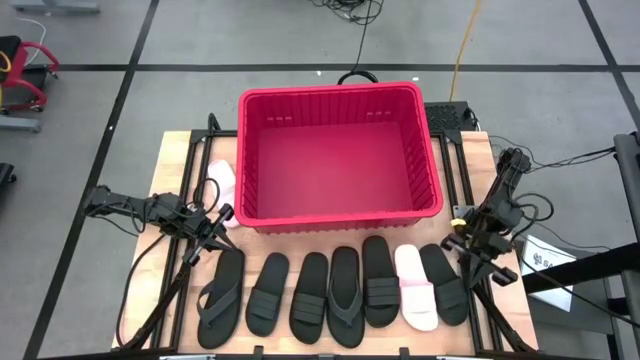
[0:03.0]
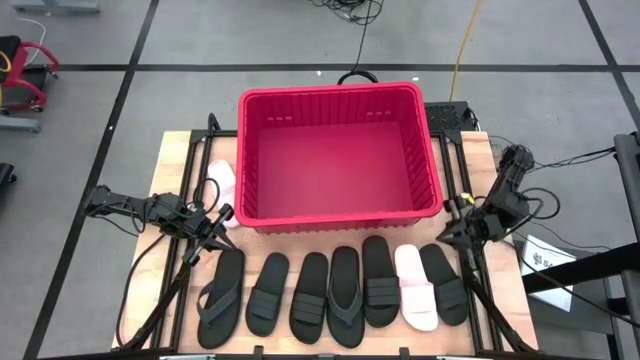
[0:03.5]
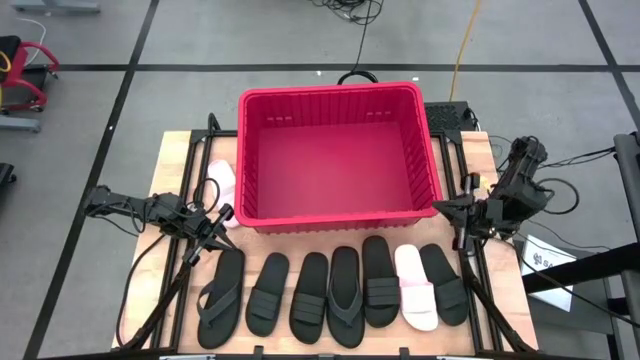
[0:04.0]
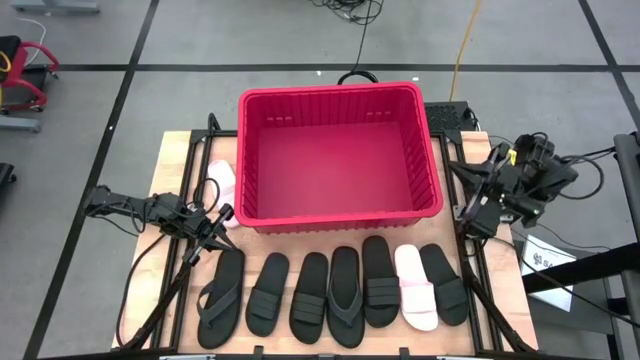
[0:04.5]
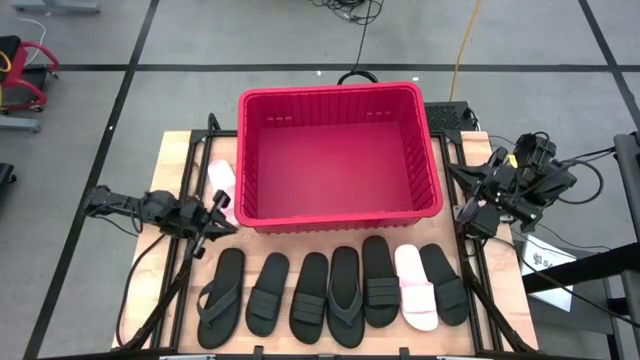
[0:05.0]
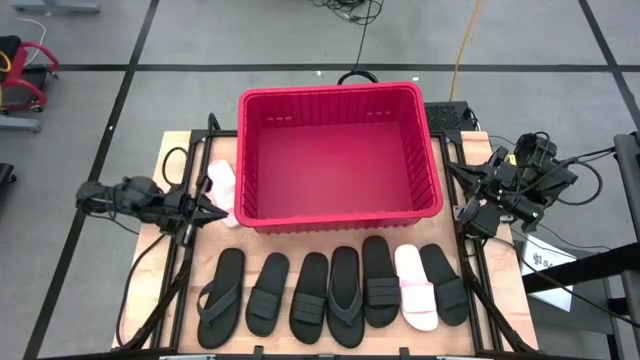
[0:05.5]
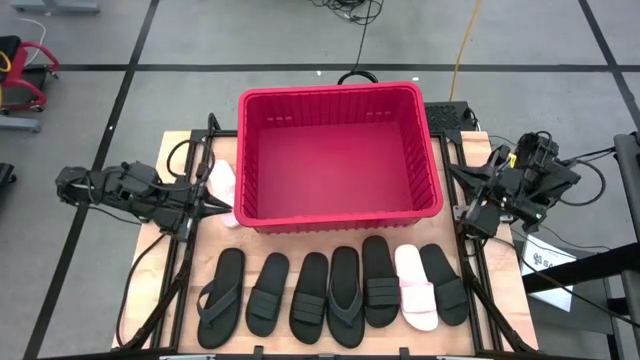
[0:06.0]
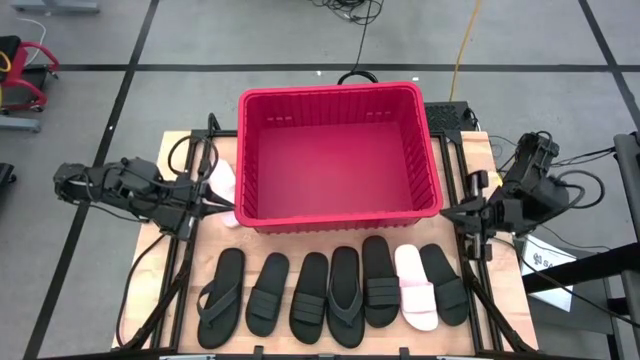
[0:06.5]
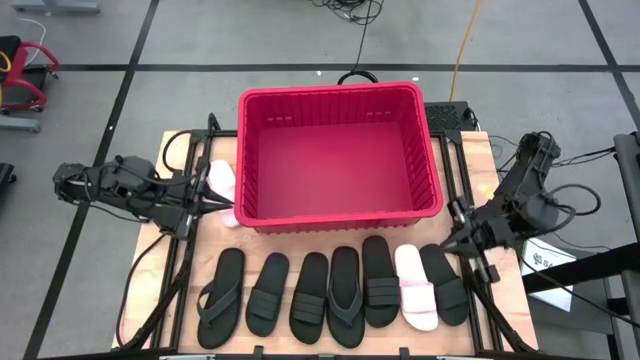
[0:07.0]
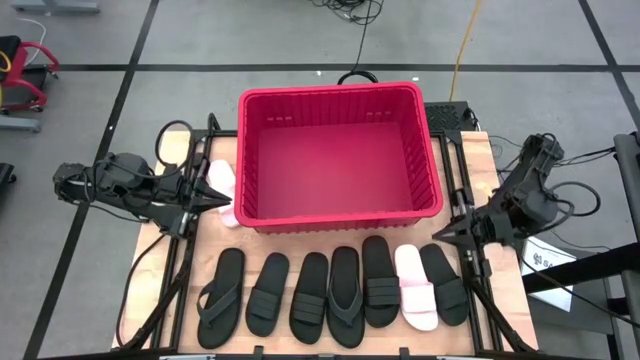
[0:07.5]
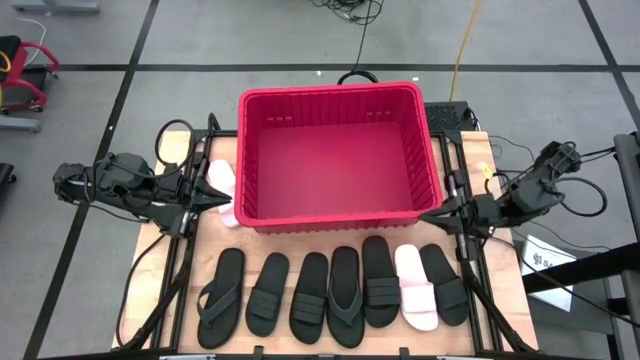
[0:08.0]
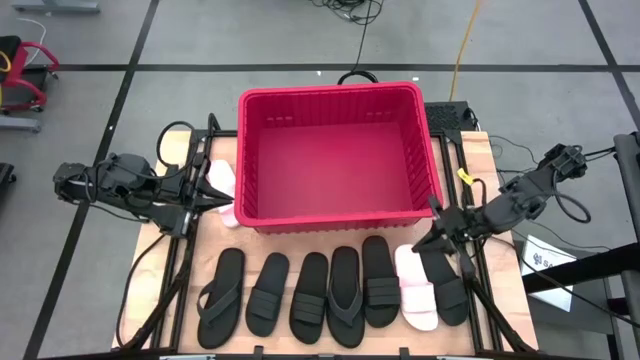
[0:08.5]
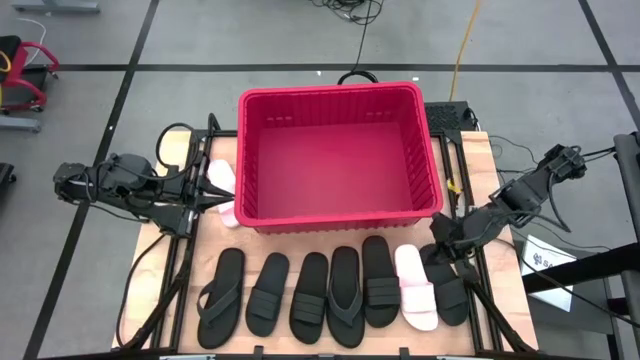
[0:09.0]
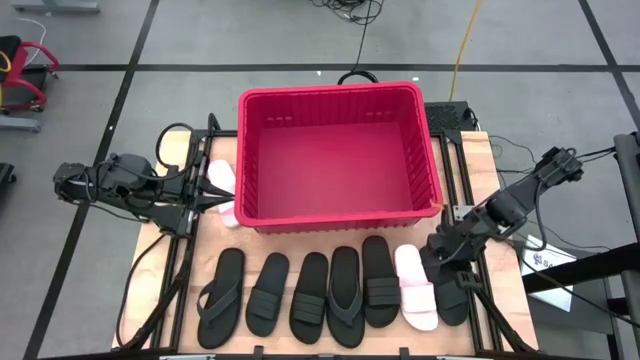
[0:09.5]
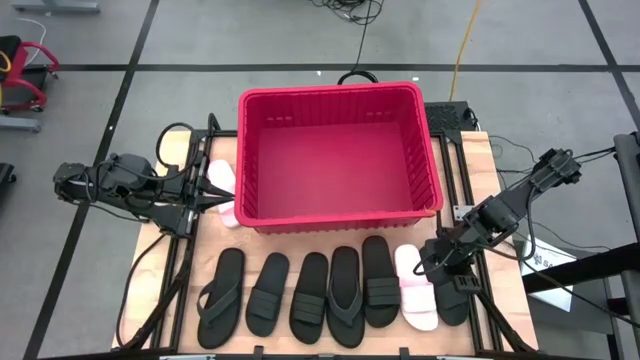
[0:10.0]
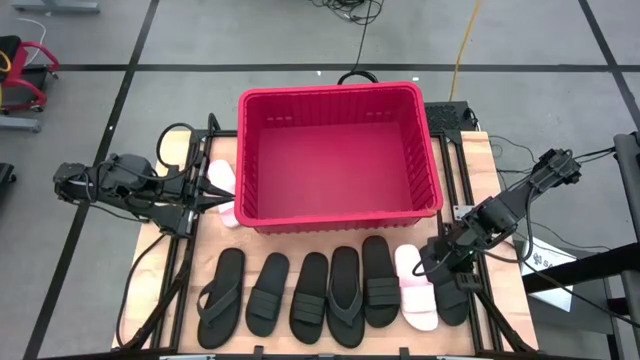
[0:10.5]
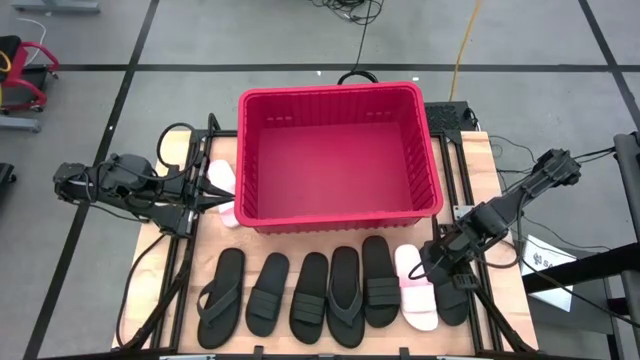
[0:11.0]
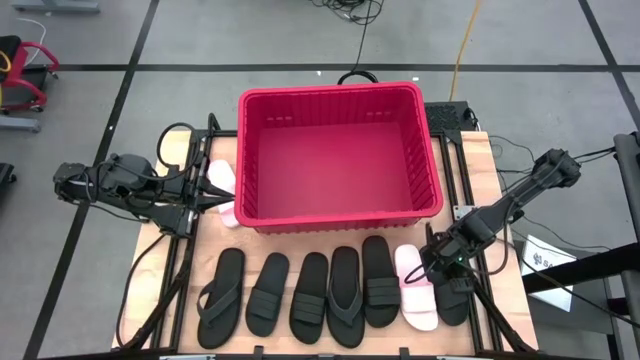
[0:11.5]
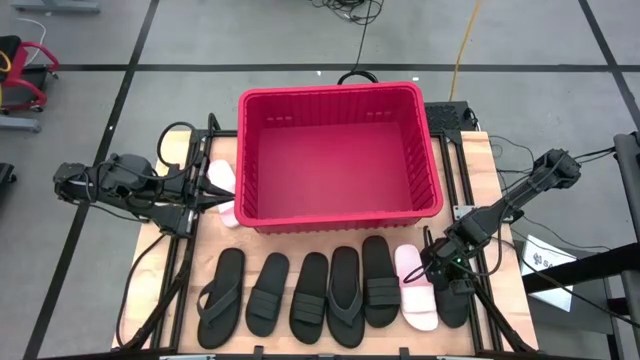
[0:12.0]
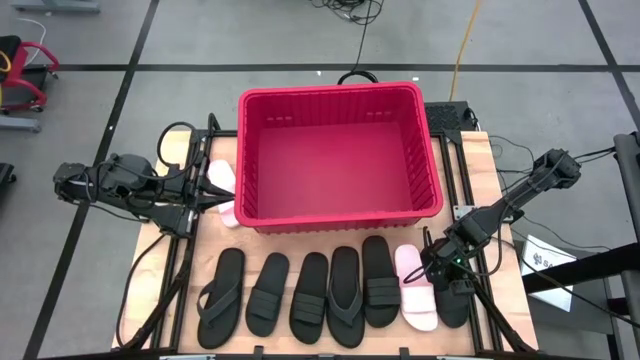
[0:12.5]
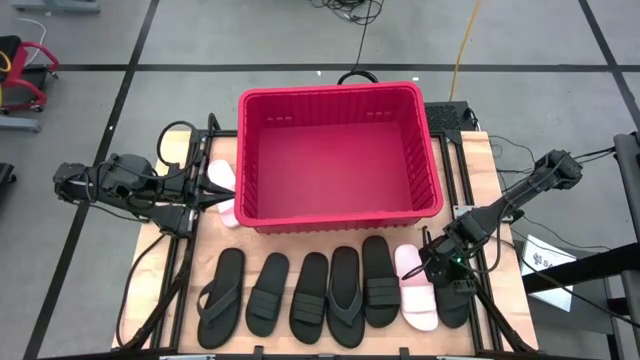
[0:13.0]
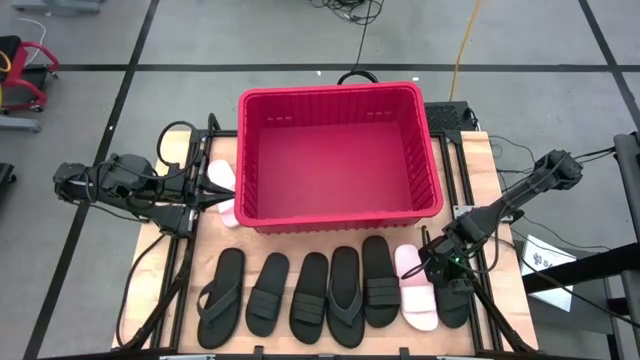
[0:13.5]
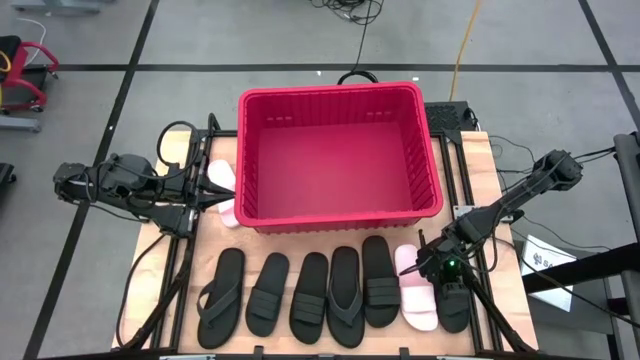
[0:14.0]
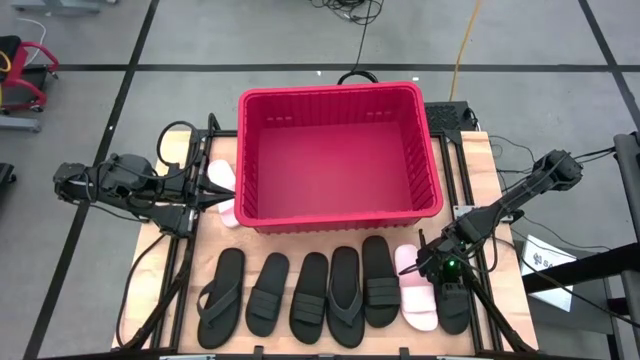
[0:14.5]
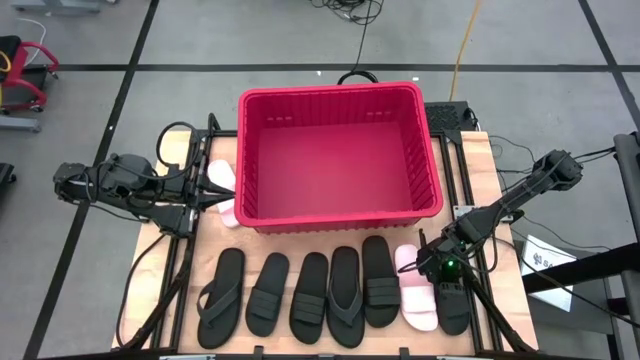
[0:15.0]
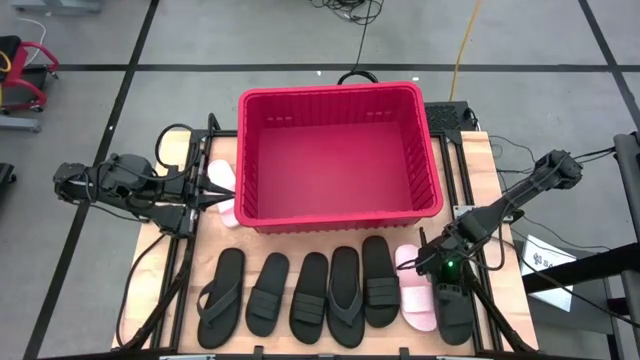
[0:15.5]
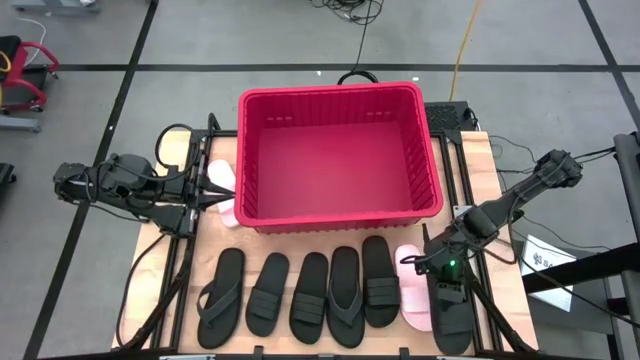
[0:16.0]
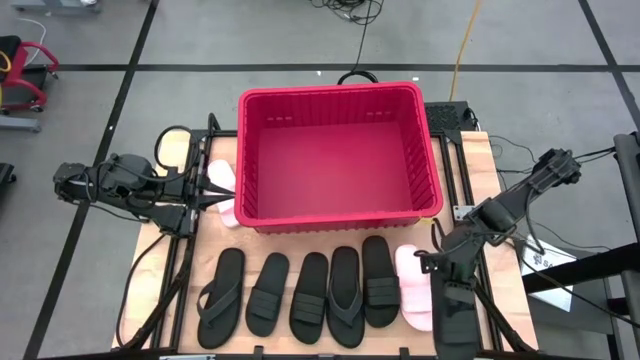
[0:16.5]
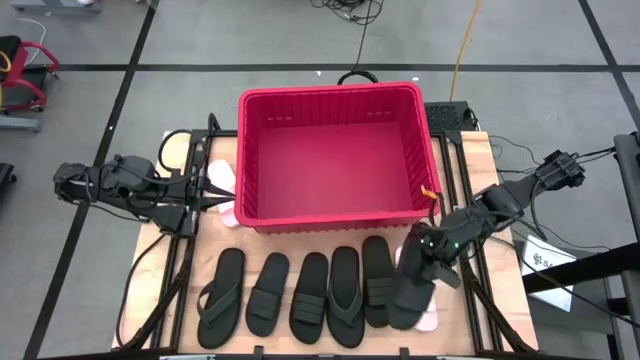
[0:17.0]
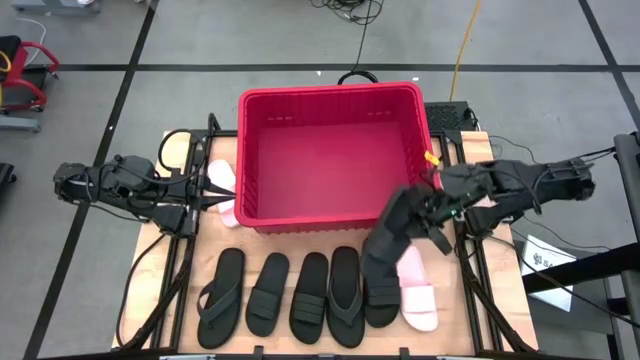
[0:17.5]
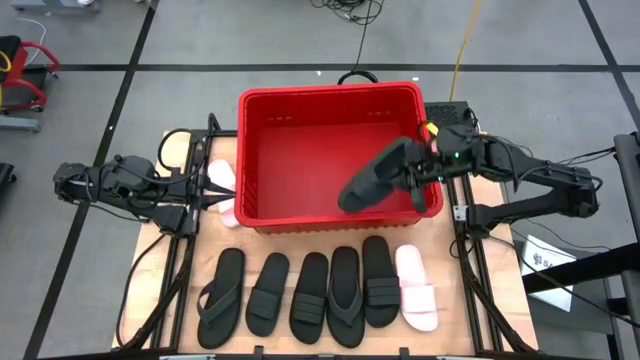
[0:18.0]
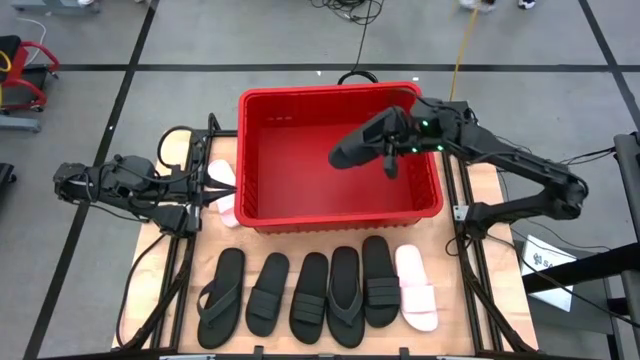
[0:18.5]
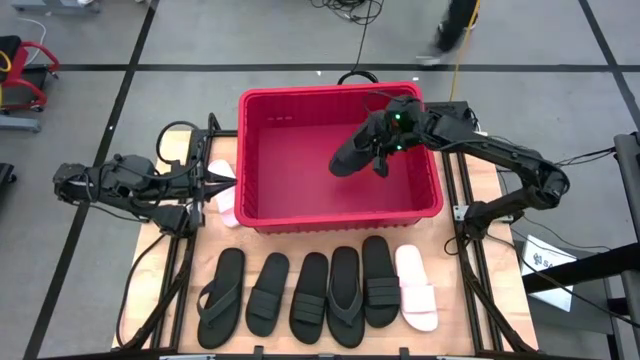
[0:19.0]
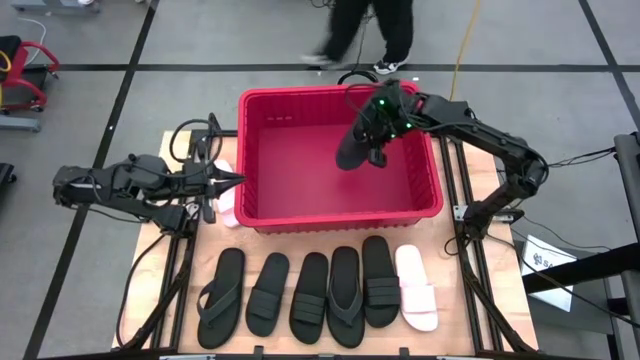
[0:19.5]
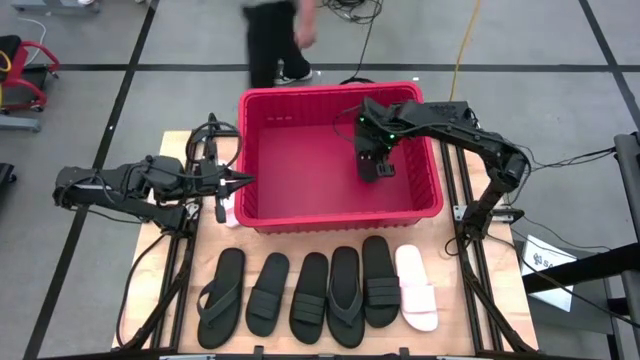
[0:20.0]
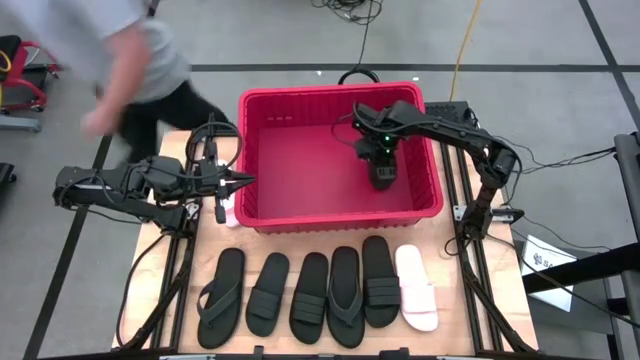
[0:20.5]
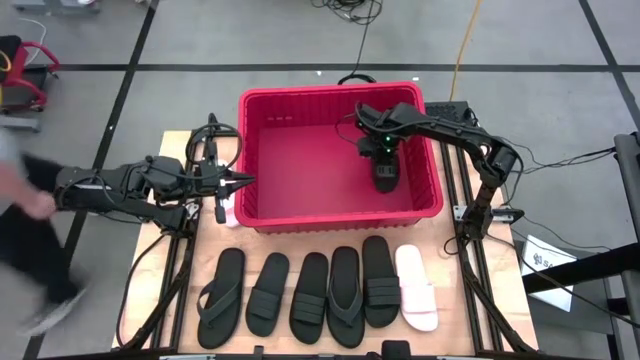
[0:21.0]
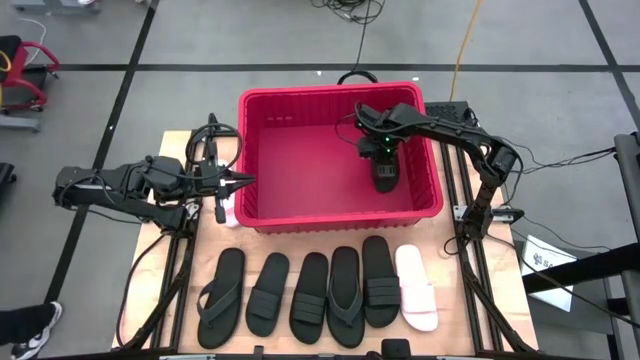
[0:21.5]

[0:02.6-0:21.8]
Task: Pick and place slides into bin
Put the black slipper into the red organizer bin

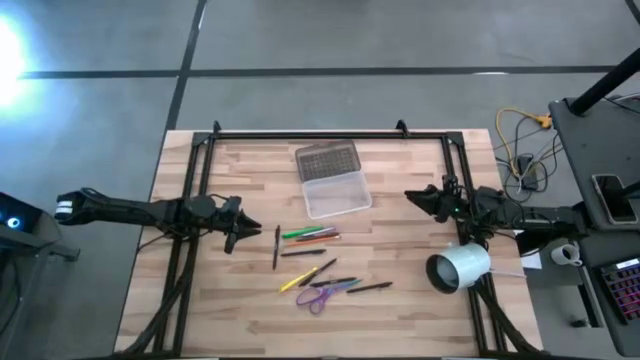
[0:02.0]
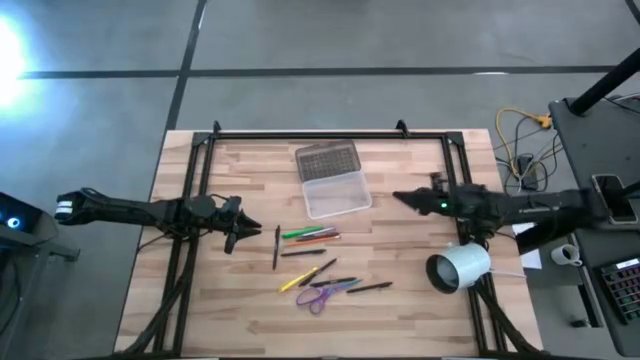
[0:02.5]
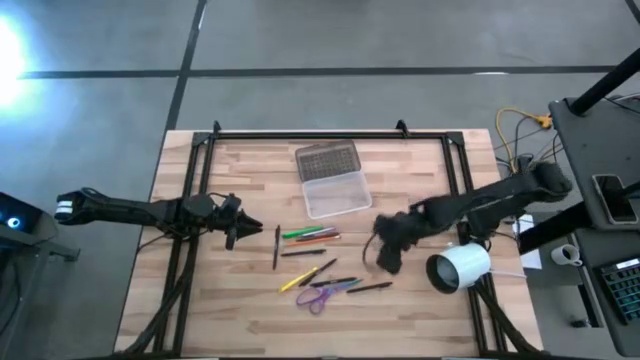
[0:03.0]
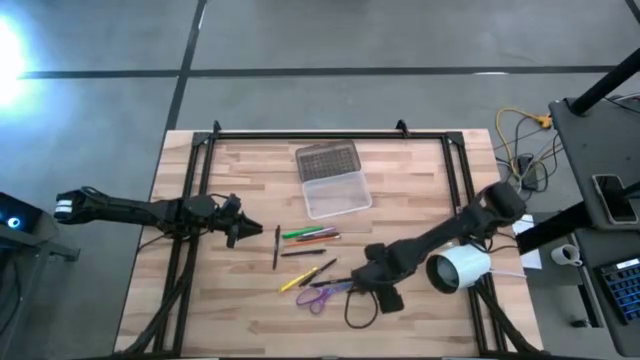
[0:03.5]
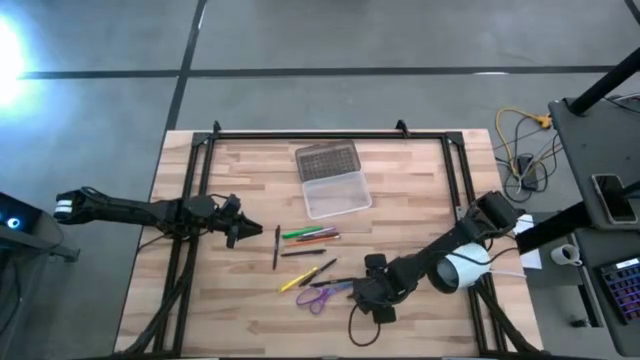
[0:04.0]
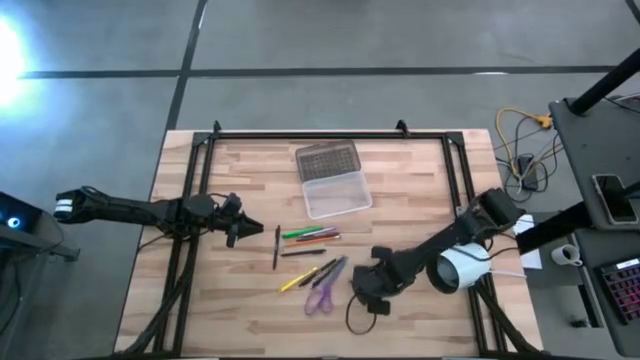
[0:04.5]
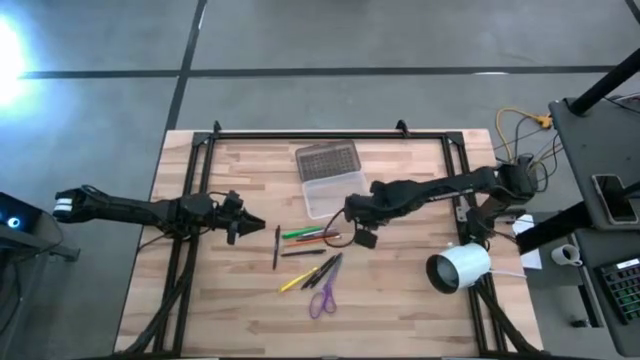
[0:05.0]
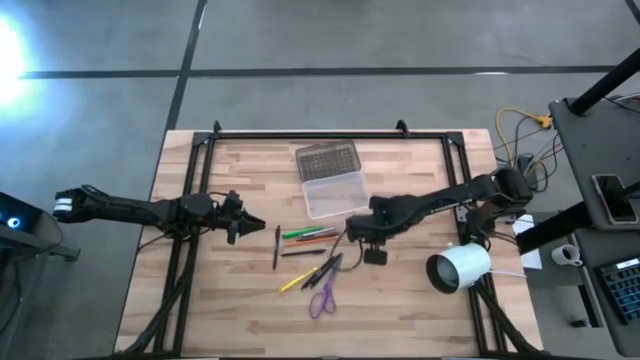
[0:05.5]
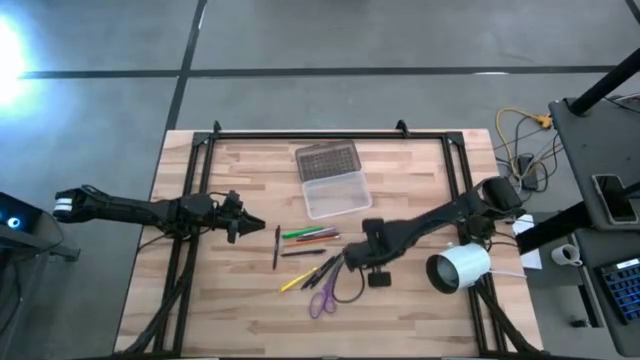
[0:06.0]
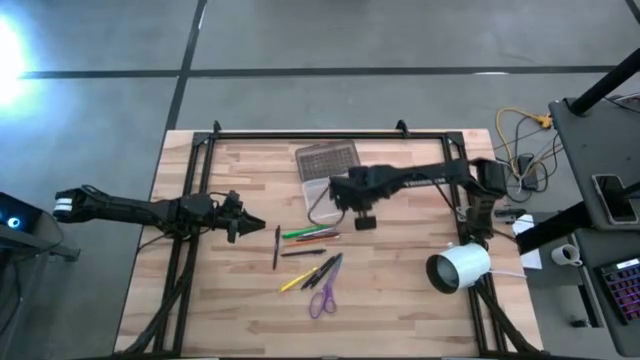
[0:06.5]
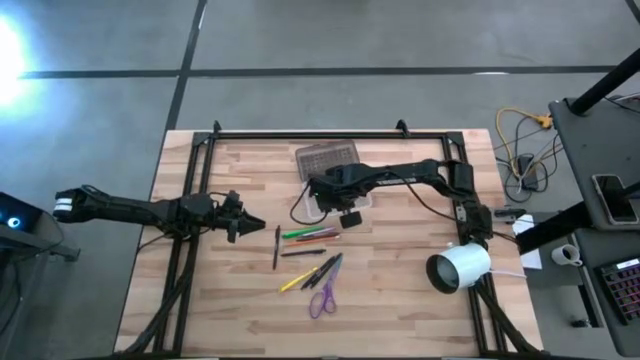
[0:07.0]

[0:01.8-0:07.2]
Task: Pick & place school supplies into a supply box
Put the black pen into the black supply box
